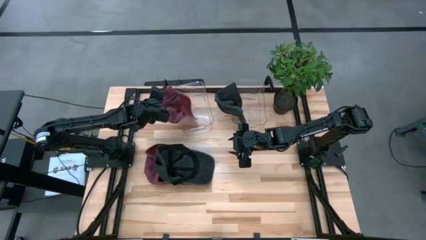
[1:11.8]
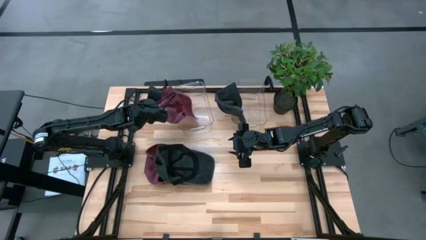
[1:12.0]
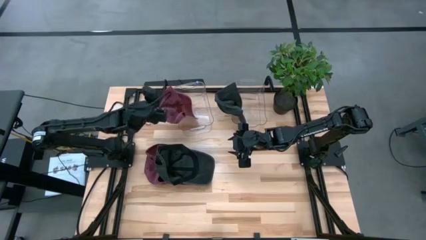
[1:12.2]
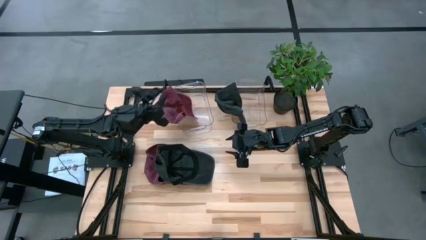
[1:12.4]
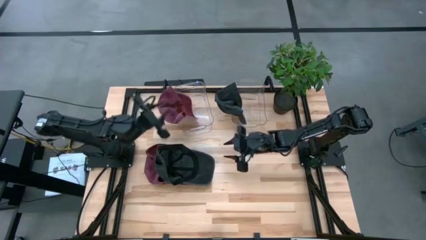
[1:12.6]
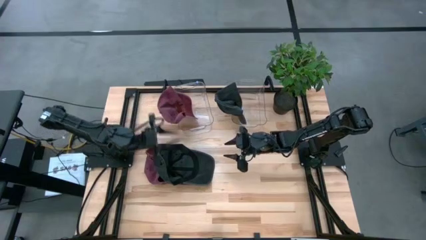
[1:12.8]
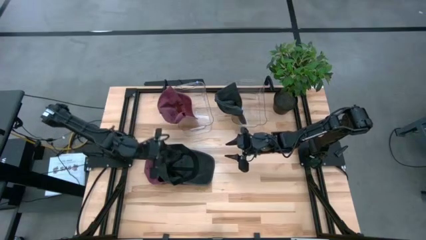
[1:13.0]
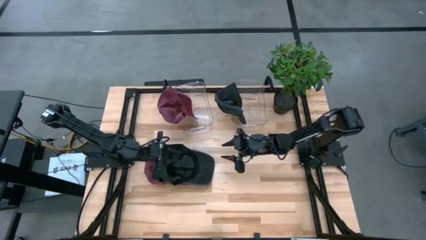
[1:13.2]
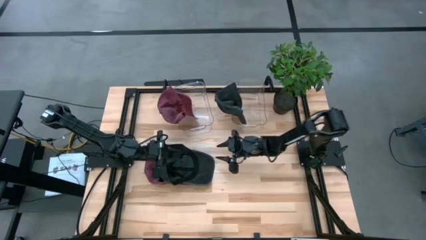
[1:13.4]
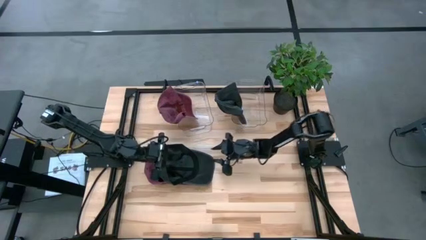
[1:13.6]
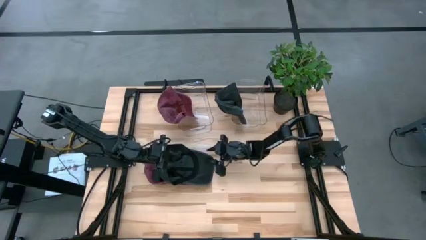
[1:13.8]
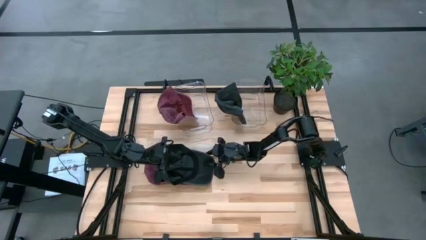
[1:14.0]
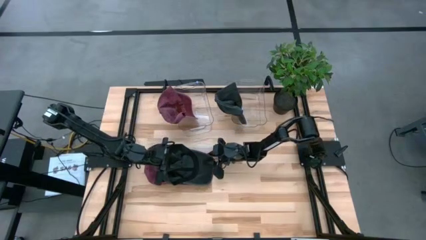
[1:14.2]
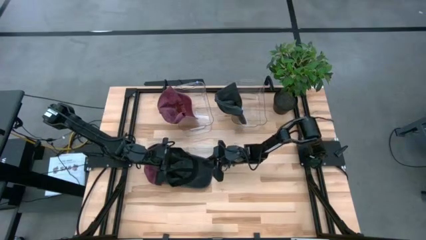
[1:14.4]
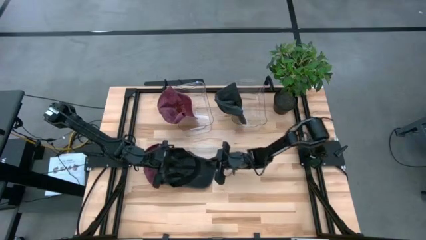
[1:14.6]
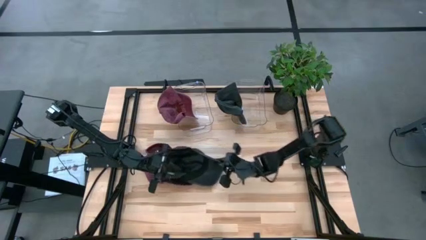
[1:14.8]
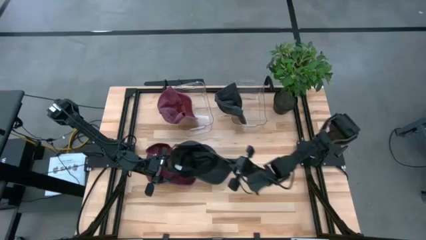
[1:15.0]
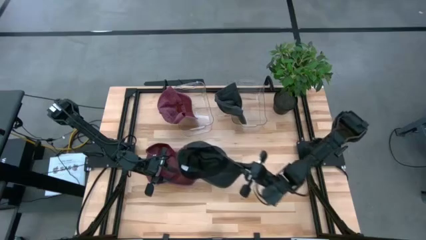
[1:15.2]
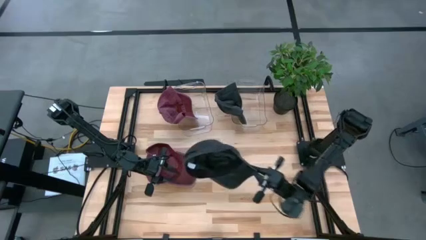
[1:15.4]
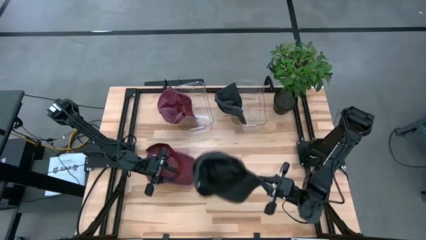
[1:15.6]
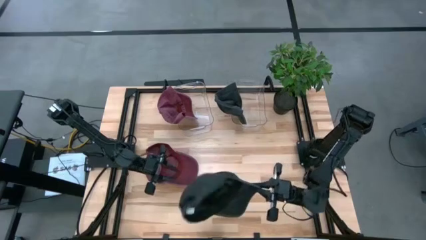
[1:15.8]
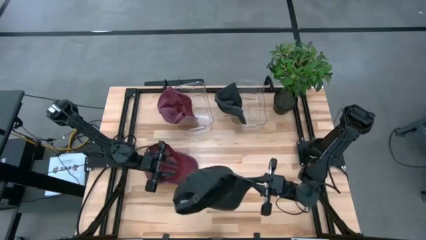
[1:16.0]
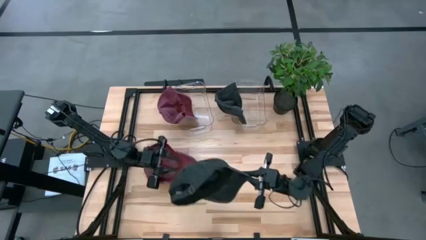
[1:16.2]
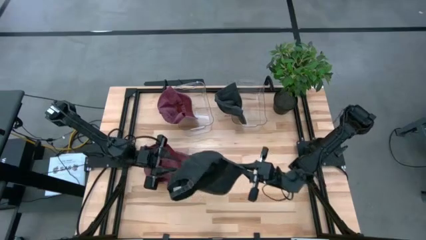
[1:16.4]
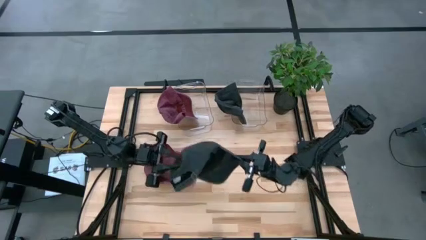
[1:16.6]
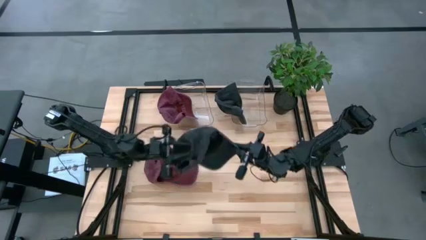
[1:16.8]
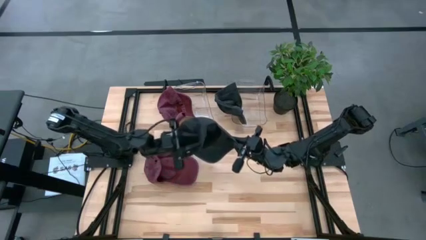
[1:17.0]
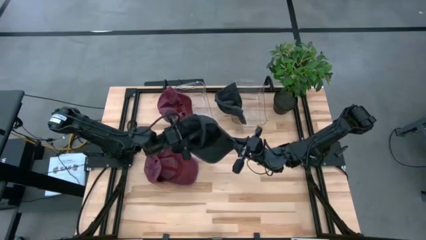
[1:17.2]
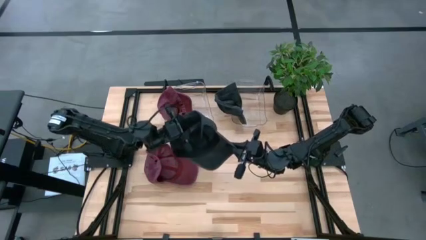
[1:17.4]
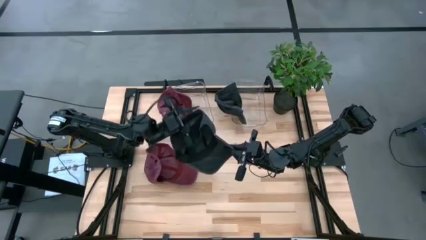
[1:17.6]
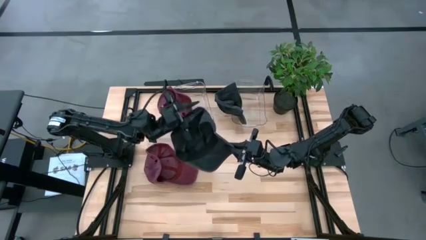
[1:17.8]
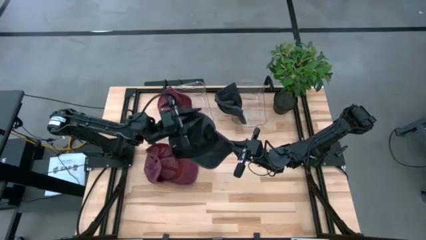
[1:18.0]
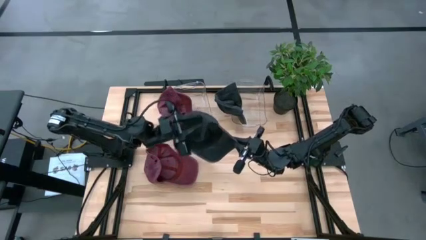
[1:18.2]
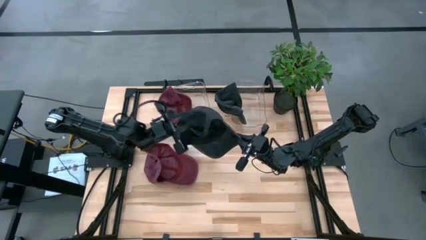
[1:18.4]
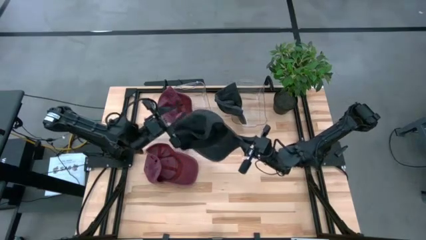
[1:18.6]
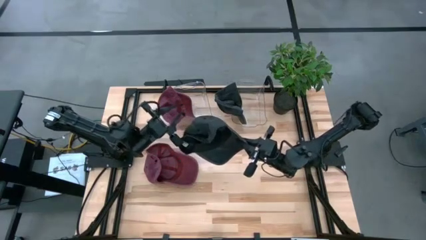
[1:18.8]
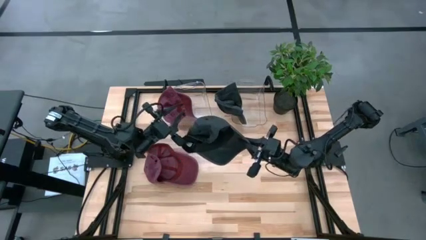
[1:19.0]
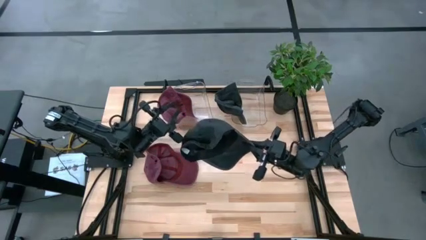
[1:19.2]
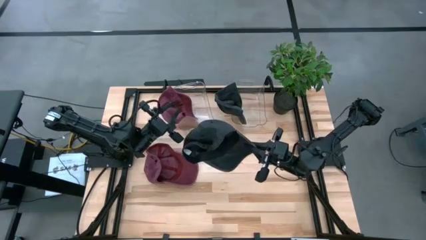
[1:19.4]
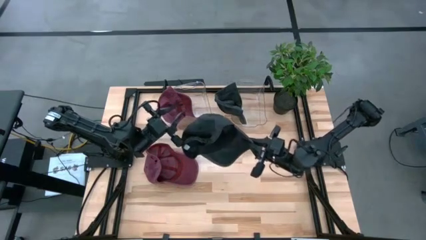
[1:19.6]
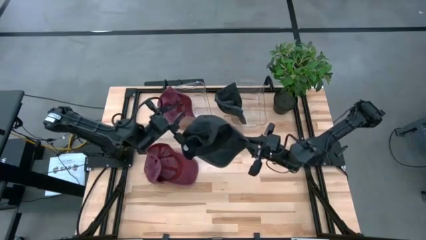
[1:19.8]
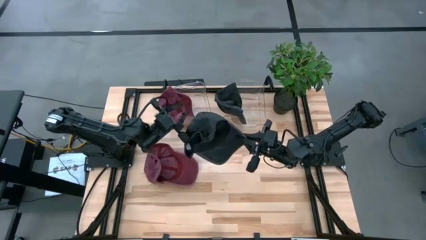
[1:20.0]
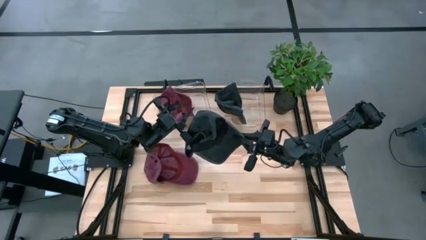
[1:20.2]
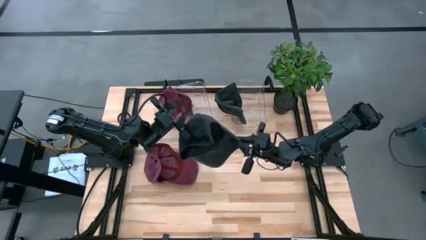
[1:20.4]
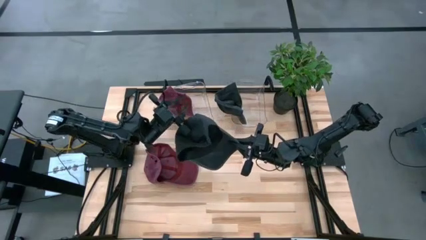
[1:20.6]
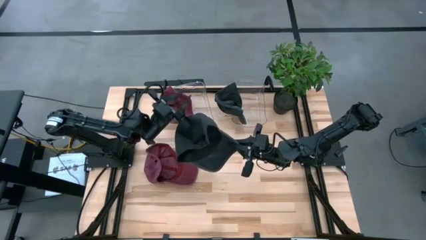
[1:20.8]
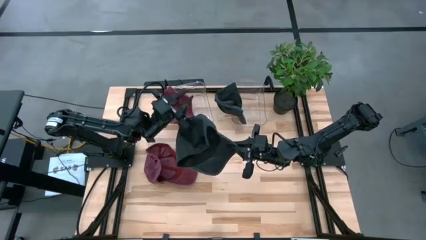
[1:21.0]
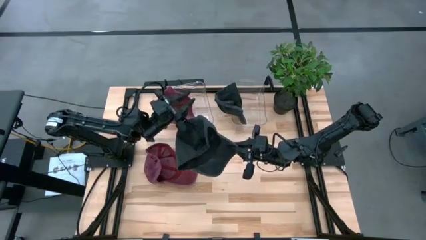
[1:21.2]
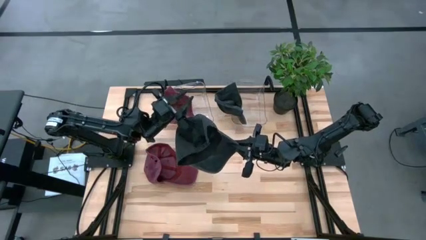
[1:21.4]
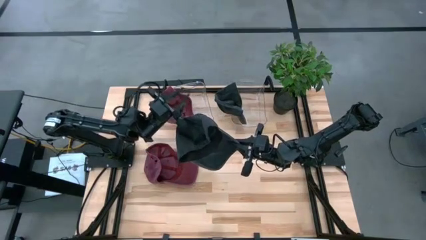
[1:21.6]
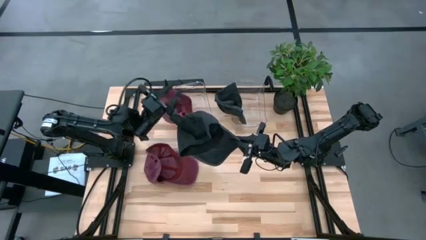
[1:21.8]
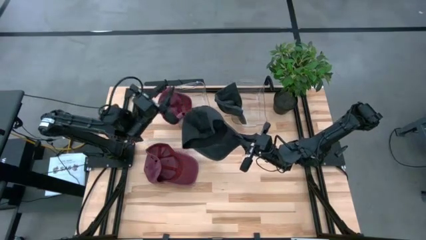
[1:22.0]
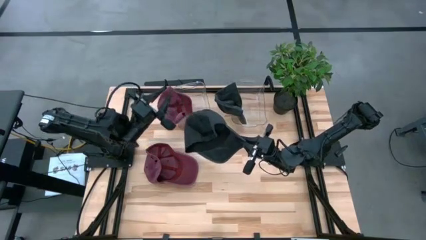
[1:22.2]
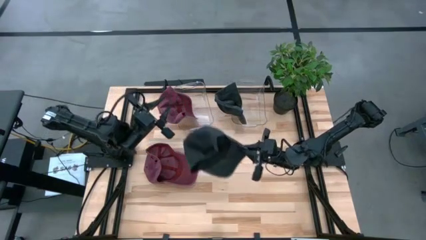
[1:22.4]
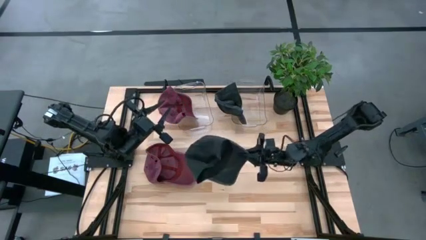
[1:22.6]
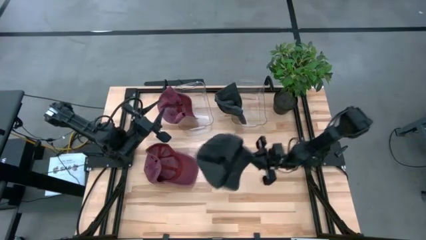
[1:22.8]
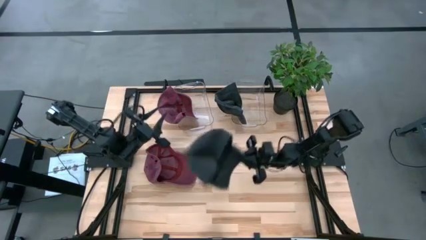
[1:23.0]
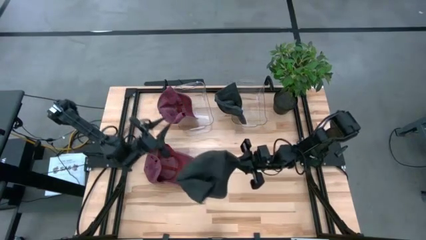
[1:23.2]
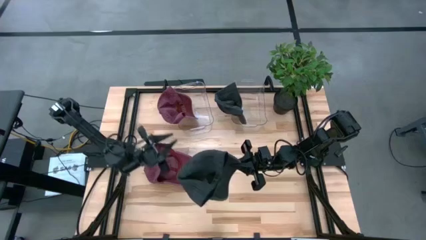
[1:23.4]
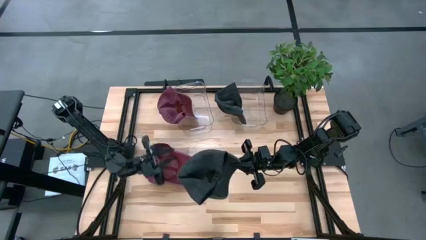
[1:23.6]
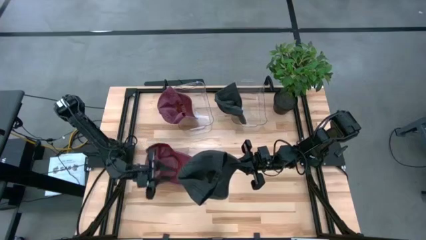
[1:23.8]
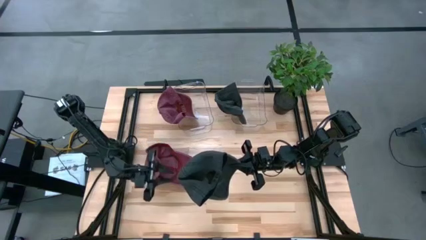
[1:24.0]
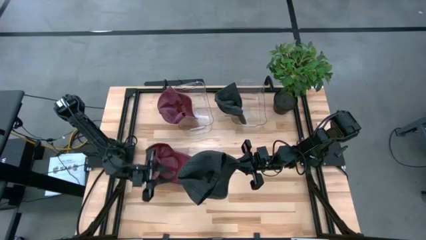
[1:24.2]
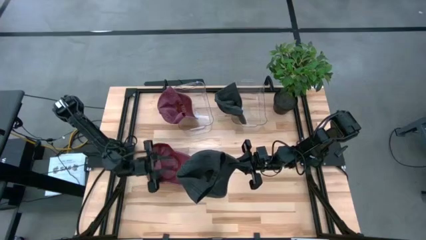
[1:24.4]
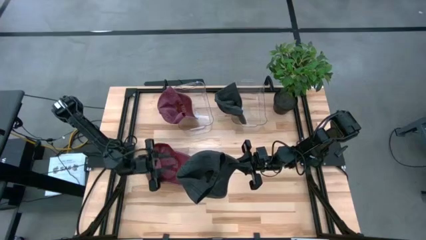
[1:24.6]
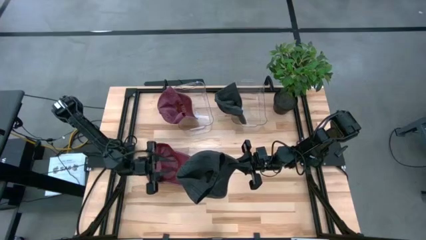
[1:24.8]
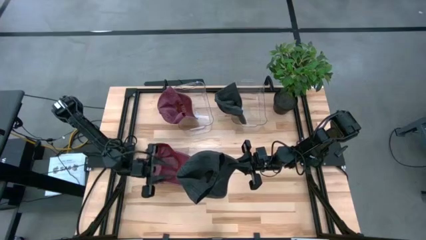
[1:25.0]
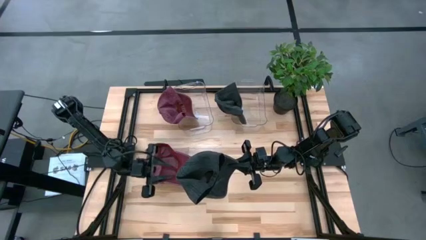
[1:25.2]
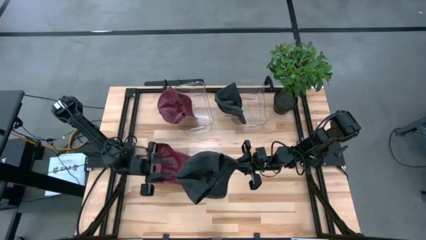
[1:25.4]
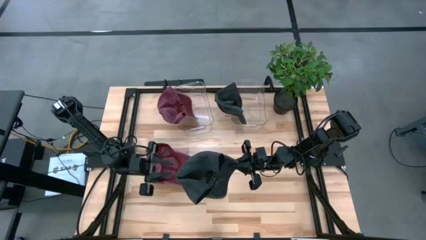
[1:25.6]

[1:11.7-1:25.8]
Task: Pick & Place hat
Put the black cap in the right transparent bin

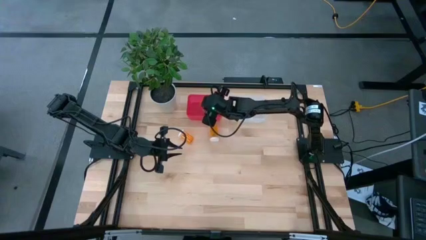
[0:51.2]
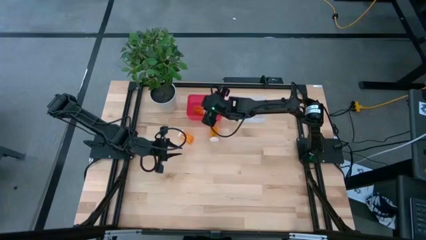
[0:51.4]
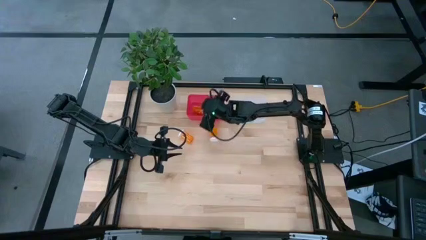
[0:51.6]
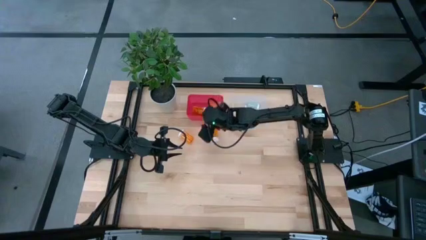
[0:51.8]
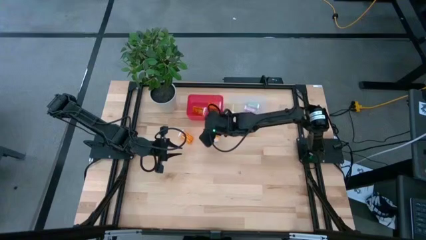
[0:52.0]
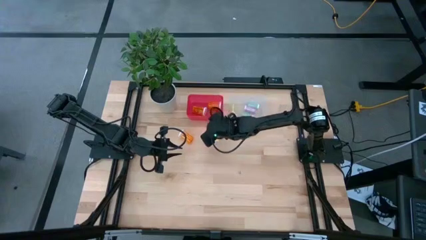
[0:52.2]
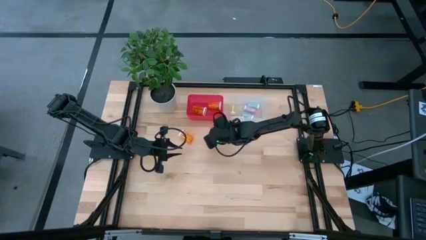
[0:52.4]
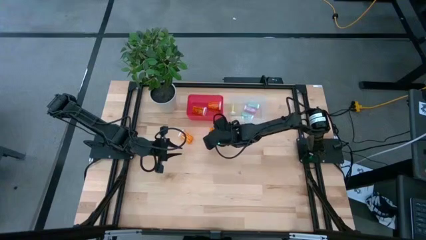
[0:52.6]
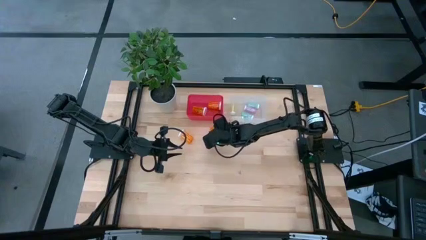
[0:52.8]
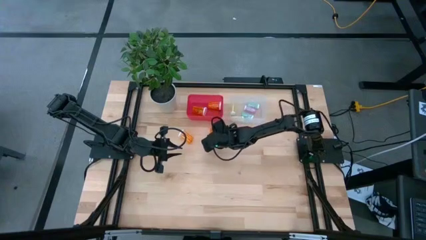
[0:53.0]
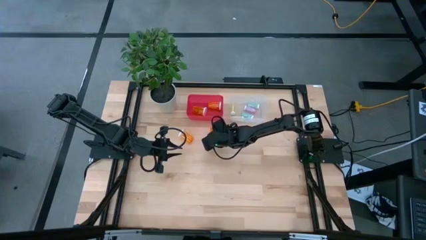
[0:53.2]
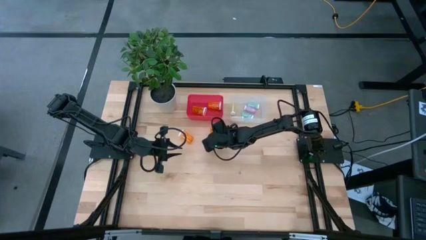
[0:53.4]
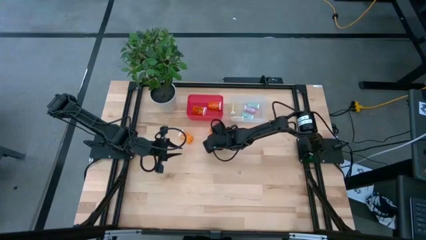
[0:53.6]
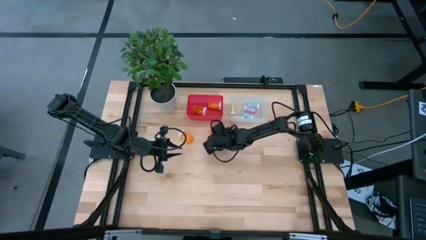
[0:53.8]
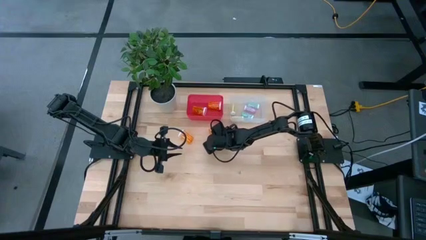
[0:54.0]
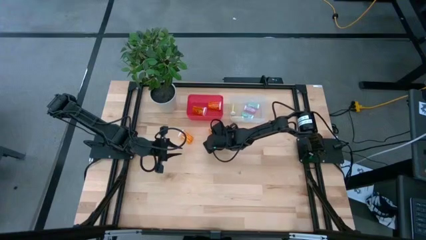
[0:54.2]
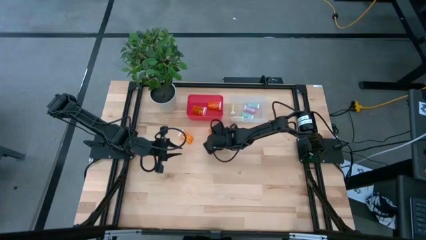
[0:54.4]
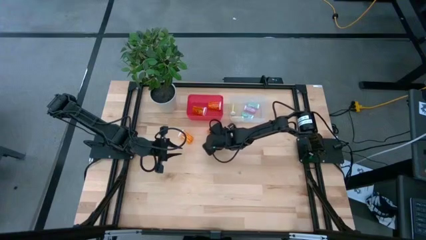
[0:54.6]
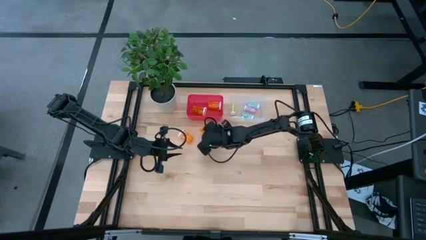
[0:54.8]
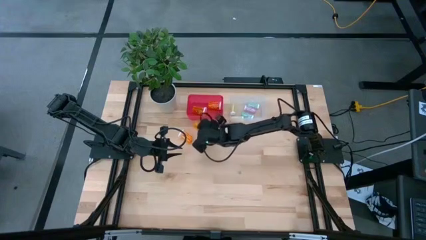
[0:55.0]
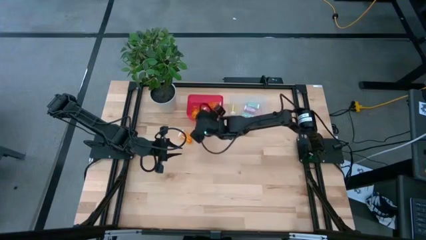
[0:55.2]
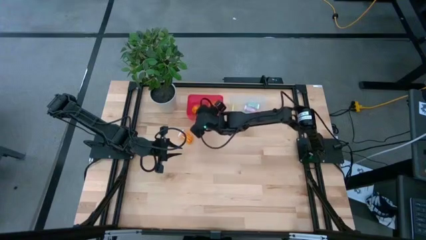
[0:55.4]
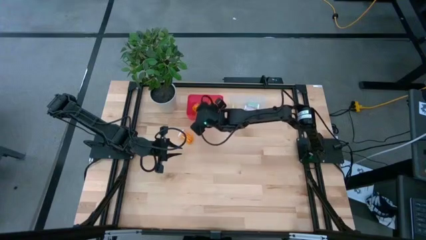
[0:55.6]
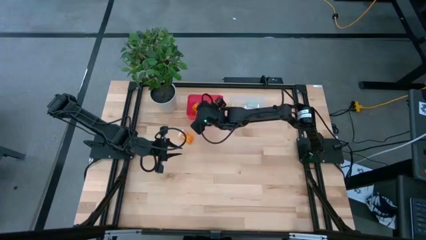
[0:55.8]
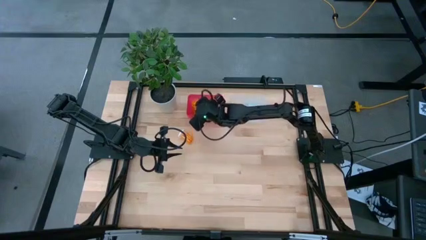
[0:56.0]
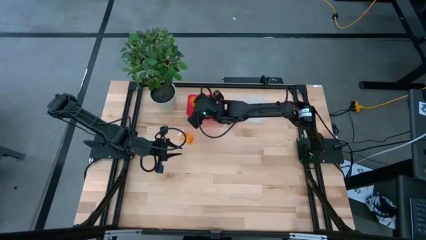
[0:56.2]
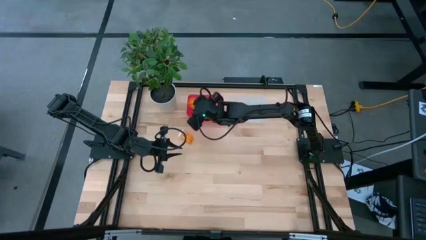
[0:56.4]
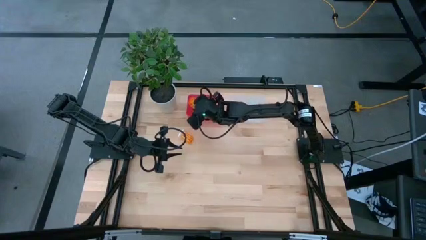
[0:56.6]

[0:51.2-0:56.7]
Task: Pick and place medicine bottles into bin by pill shape (circle, oval)
Put the orange capsule bottle into the red bin
